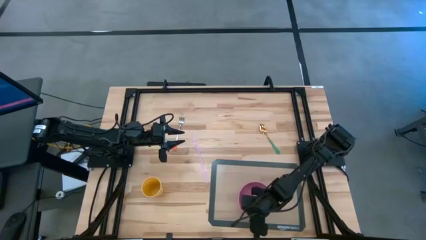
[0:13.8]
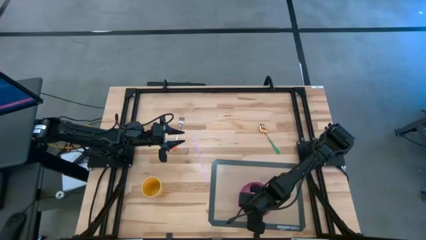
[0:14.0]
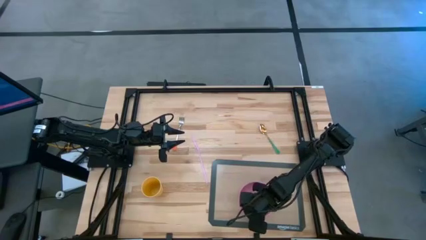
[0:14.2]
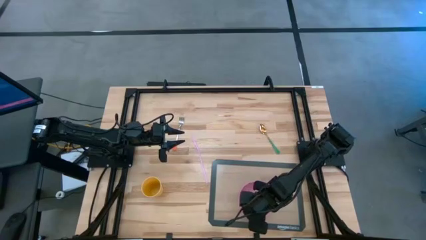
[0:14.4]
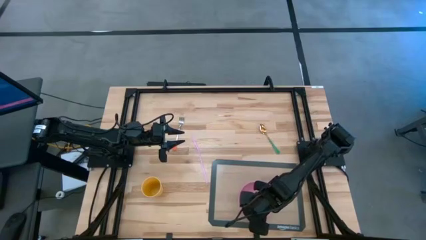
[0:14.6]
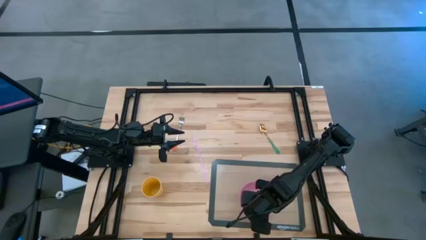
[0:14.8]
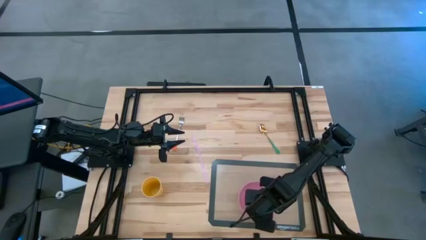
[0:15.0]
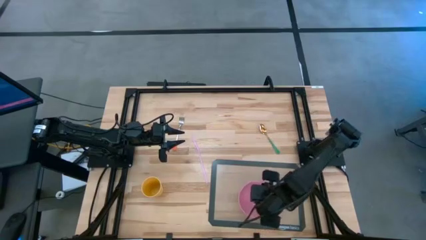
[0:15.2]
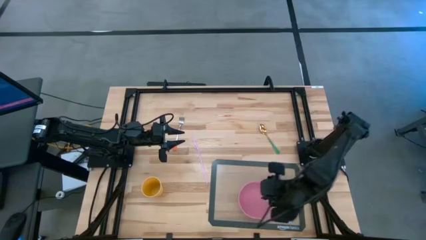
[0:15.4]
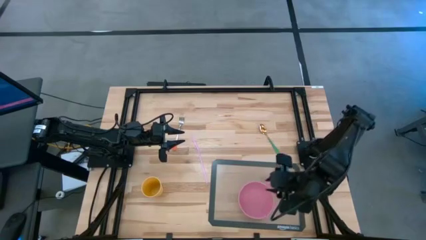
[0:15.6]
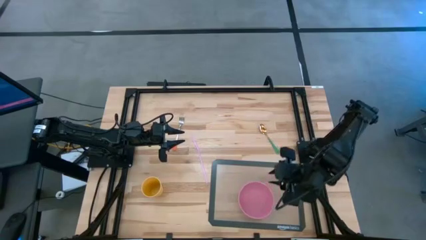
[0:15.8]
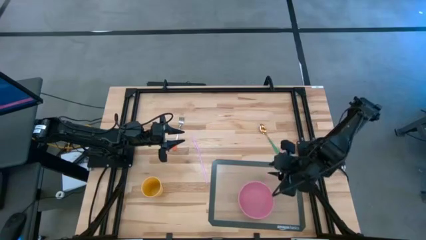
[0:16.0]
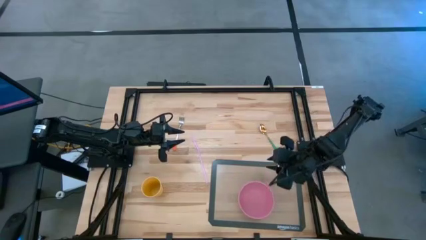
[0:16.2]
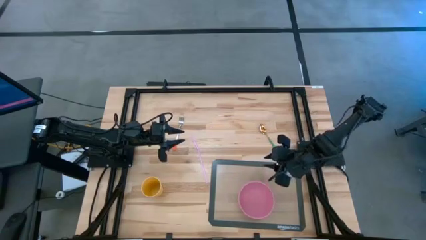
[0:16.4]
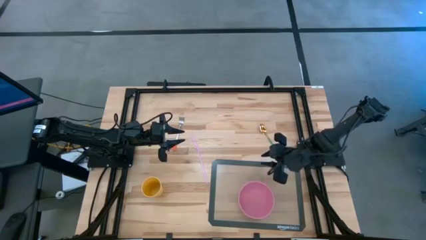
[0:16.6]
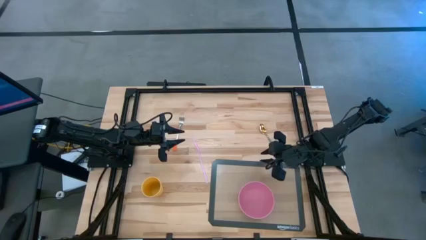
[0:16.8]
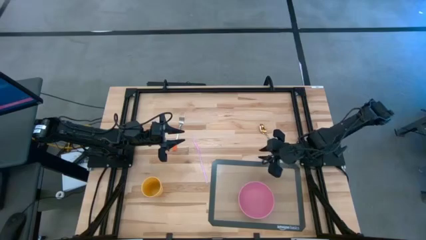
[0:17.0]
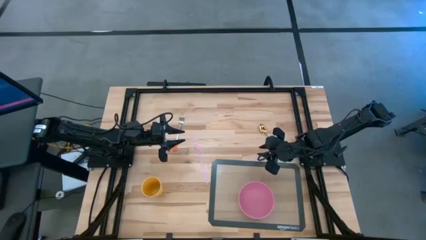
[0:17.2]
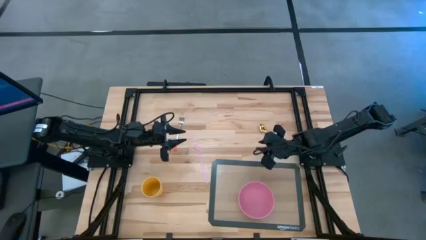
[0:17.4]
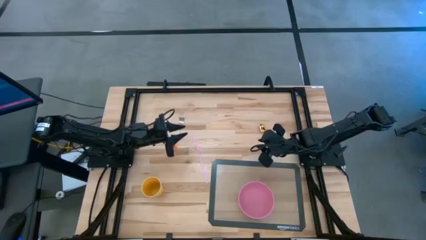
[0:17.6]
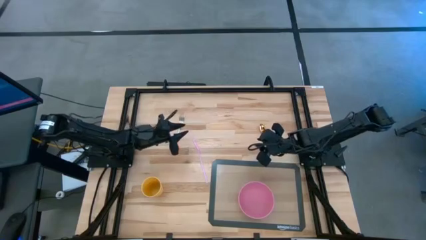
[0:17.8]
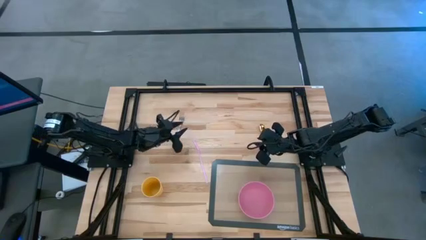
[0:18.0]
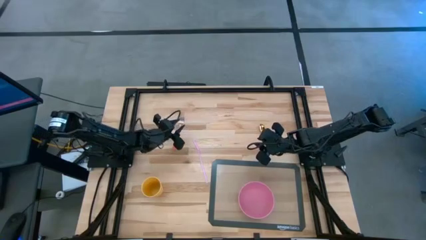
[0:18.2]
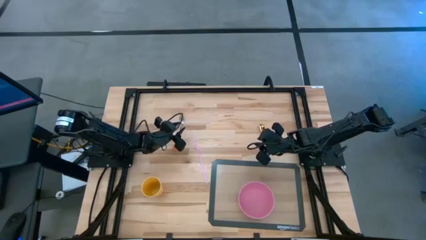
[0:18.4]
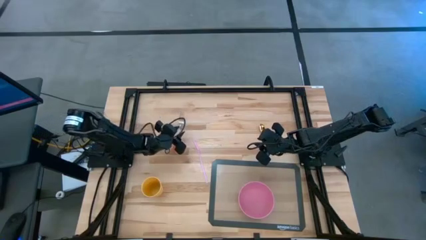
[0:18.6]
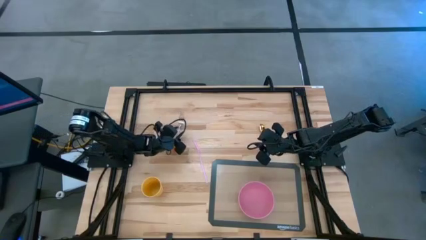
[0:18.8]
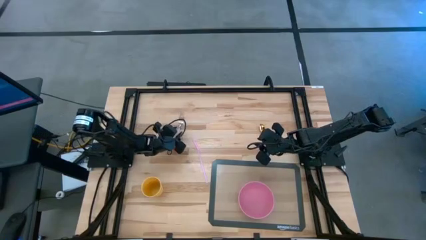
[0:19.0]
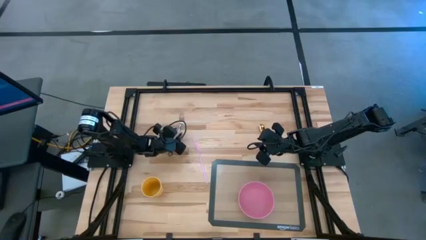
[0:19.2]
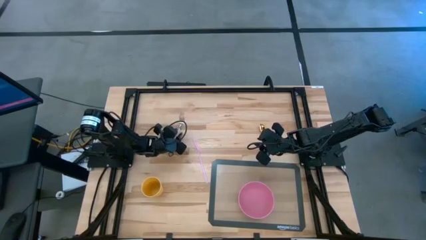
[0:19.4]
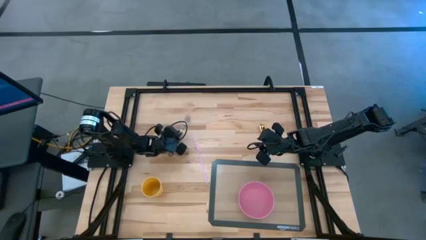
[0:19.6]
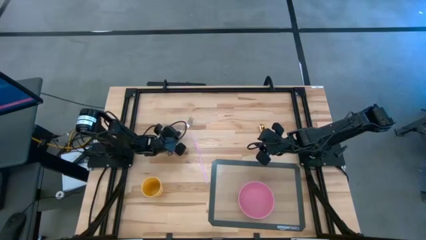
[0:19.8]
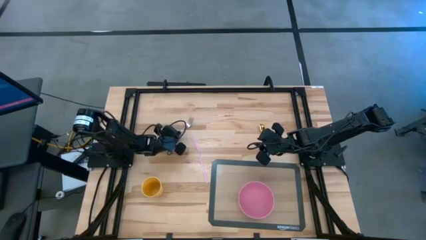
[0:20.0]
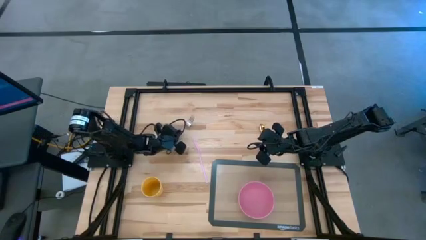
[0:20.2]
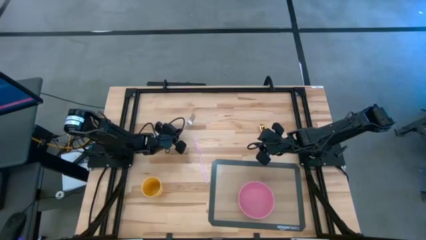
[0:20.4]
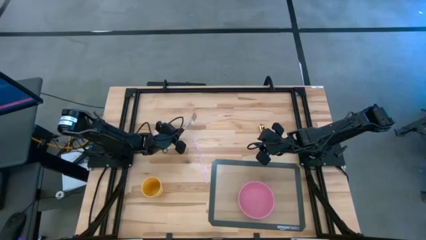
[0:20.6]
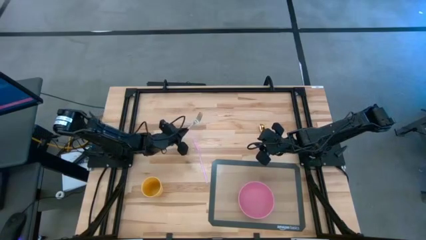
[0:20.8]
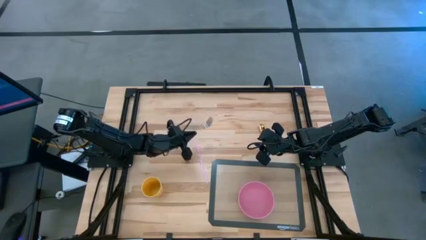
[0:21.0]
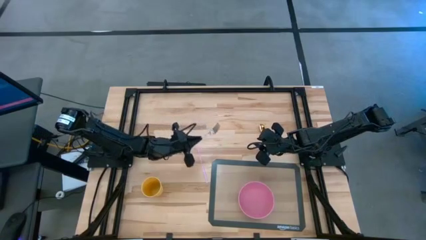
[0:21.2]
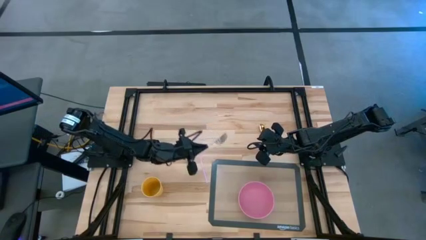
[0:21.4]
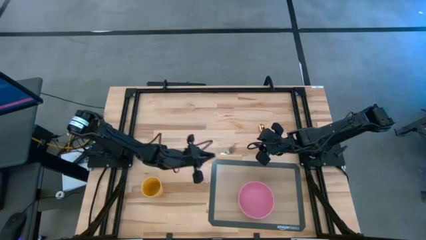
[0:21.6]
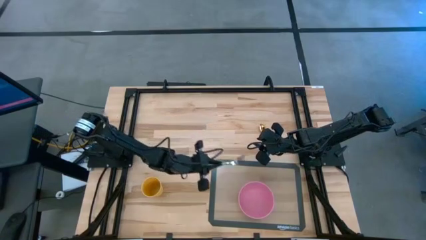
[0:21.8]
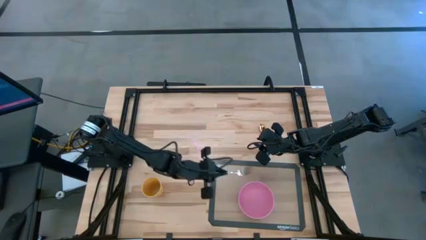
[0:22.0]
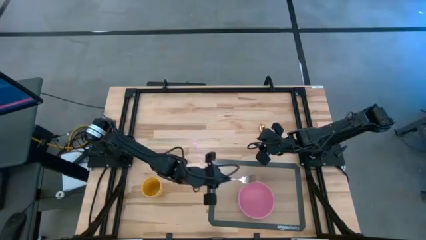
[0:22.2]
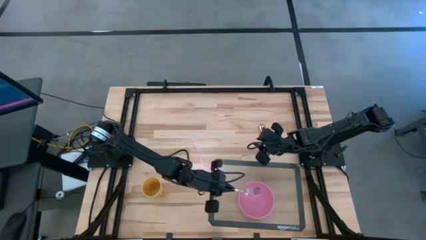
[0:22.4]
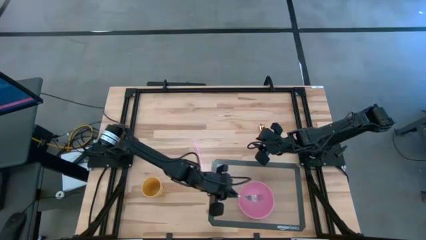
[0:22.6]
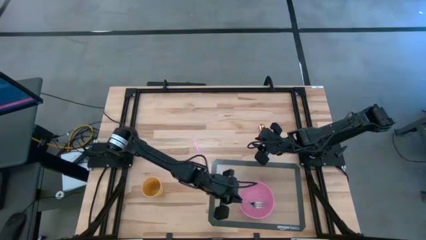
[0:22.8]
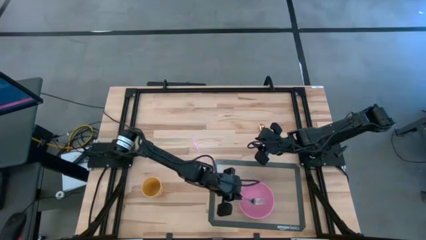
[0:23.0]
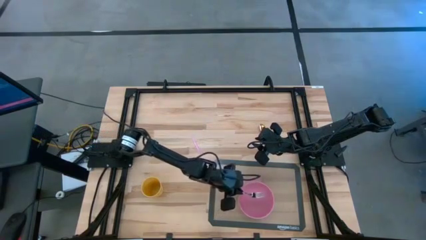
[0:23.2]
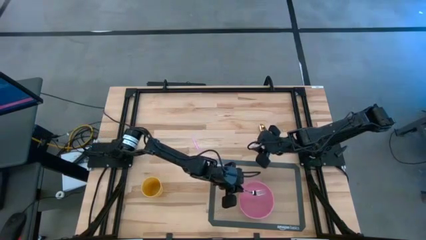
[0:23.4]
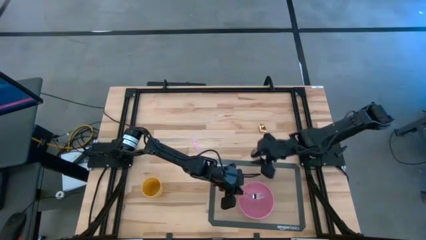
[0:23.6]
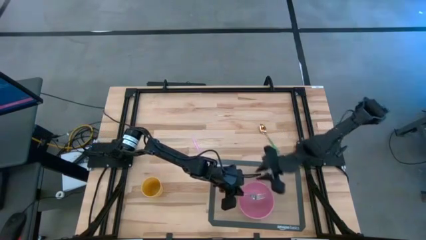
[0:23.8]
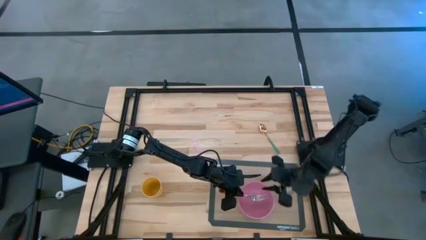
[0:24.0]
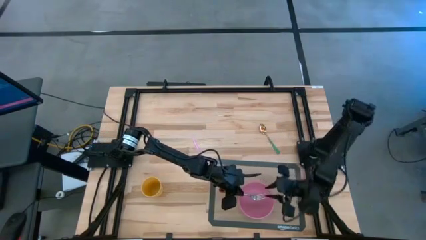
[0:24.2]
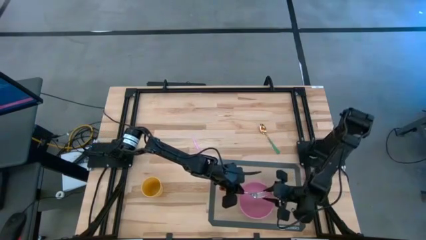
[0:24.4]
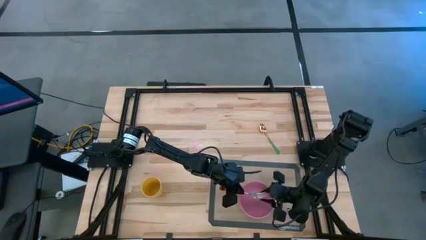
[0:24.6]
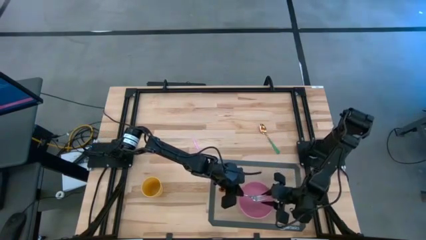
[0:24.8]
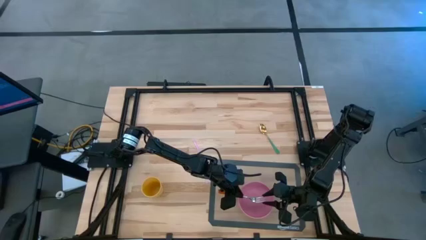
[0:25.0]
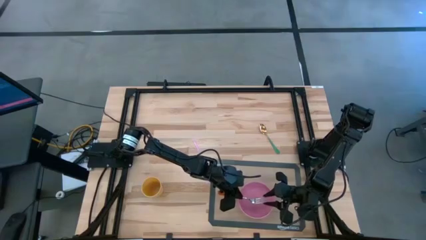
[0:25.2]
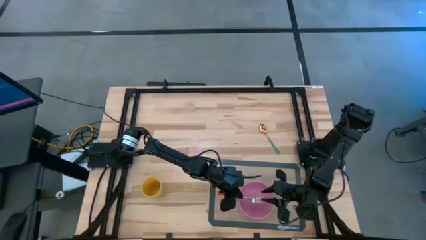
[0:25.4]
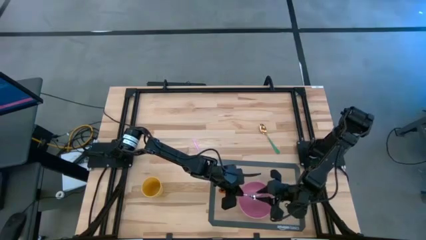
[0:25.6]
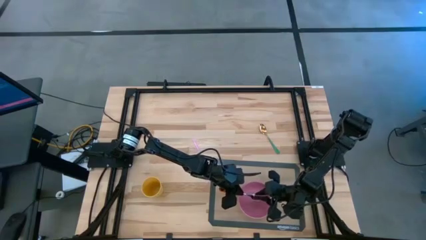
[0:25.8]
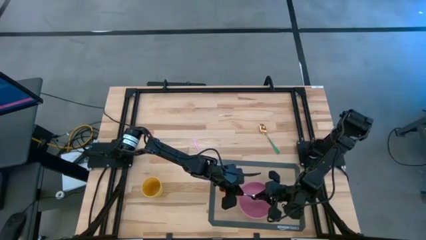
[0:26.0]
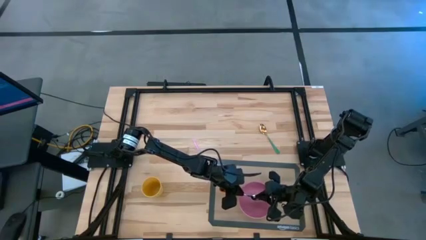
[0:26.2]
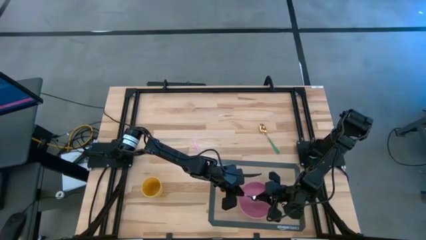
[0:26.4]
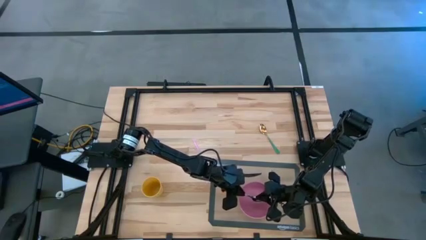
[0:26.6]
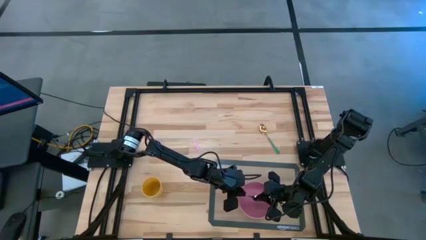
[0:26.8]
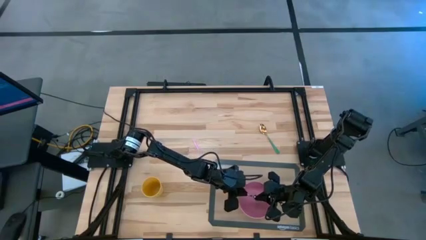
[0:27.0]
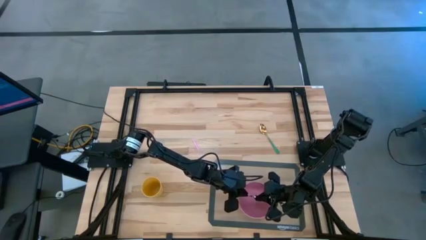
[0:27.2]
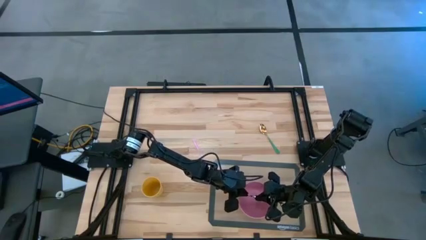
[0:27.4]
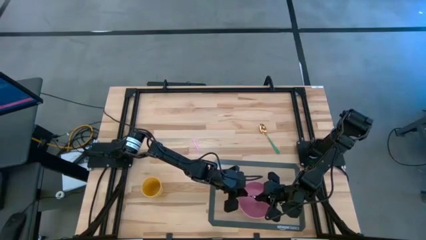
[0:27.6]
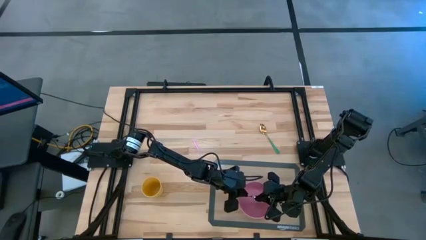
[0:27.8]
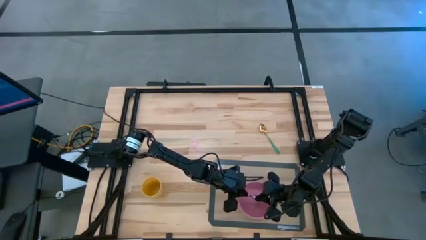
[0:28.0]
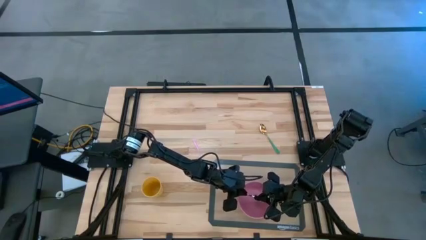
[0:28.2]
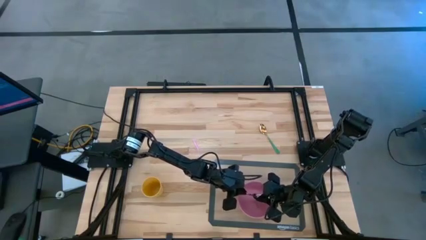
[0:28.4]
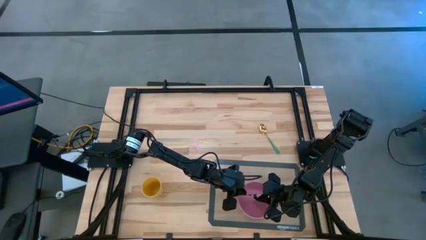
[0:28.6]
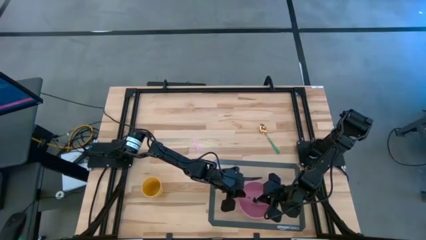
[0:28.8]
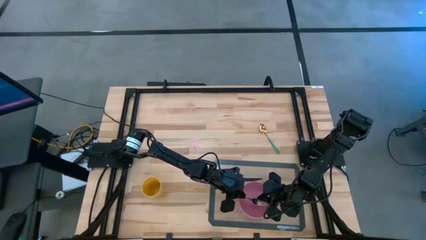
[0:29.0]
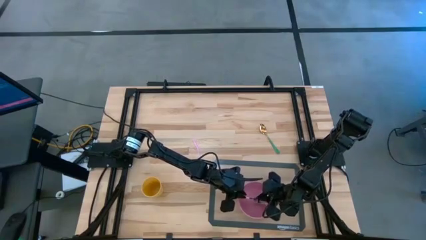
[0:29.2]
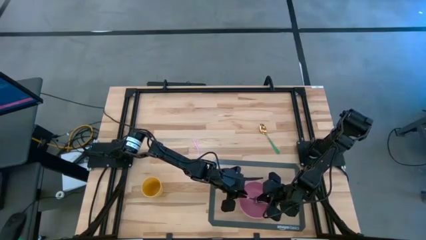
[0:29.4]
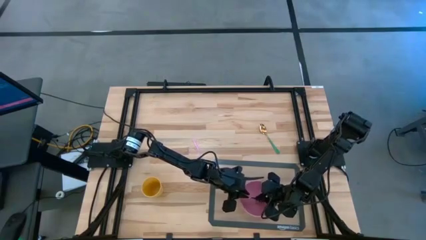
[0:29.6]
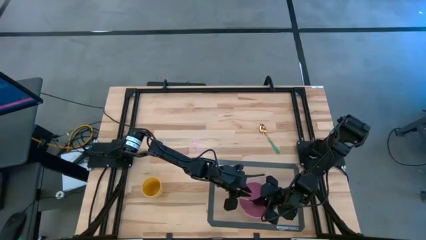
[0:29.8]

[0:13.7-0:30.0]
Task: Pick & Place Utensil
Put the fork in the pink bowl
